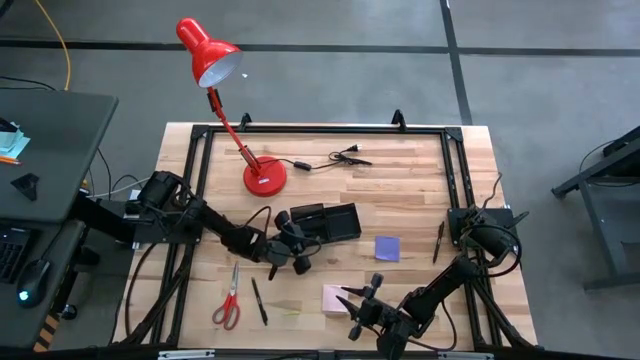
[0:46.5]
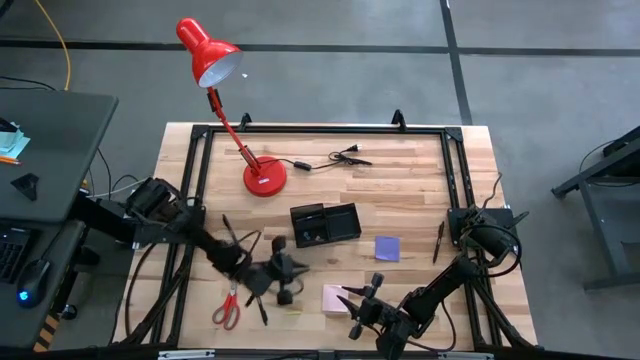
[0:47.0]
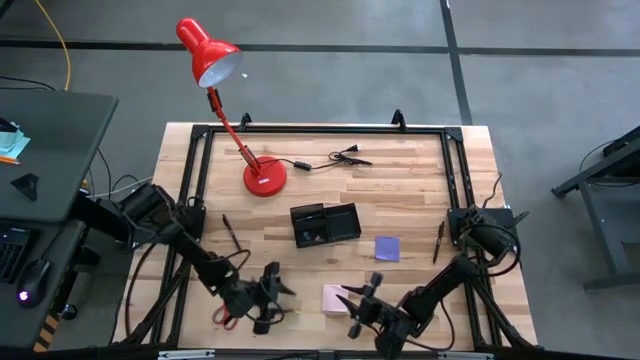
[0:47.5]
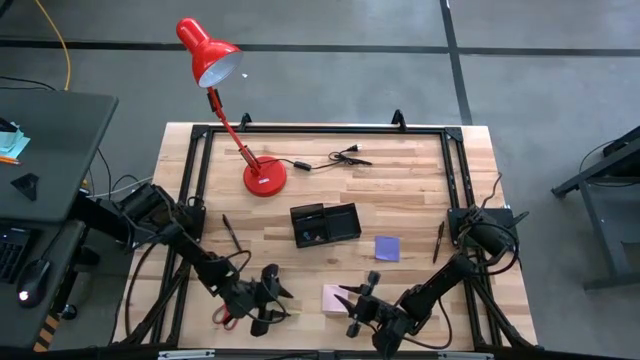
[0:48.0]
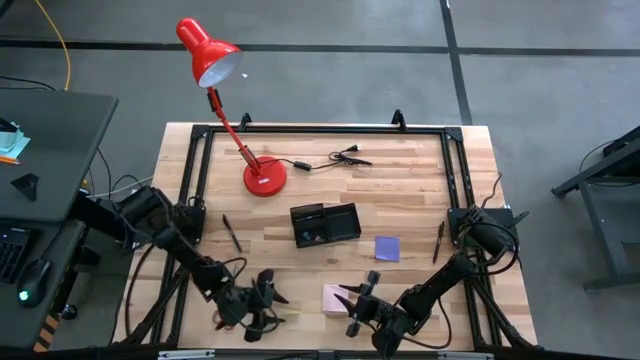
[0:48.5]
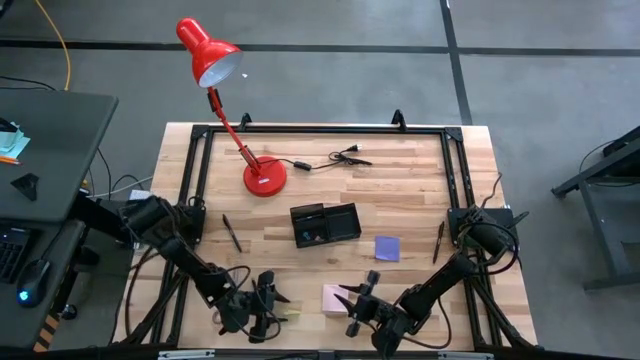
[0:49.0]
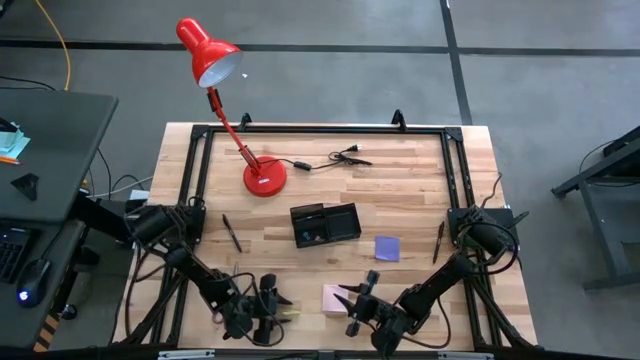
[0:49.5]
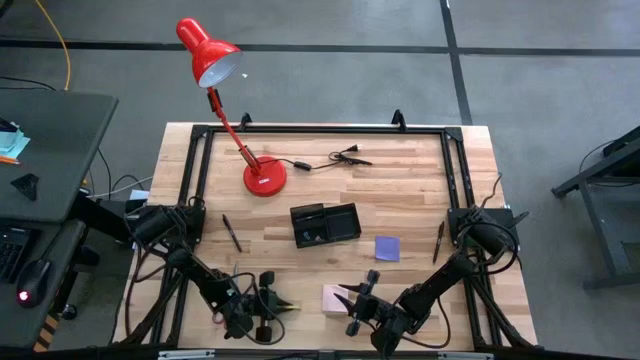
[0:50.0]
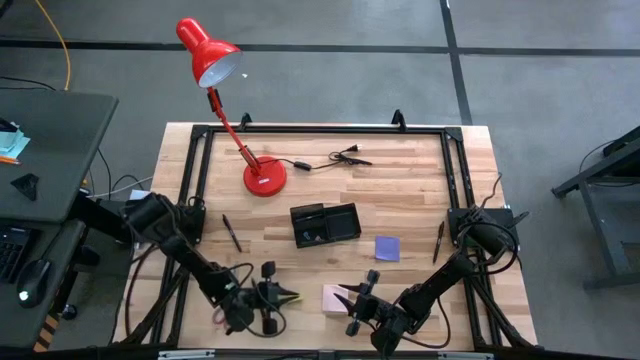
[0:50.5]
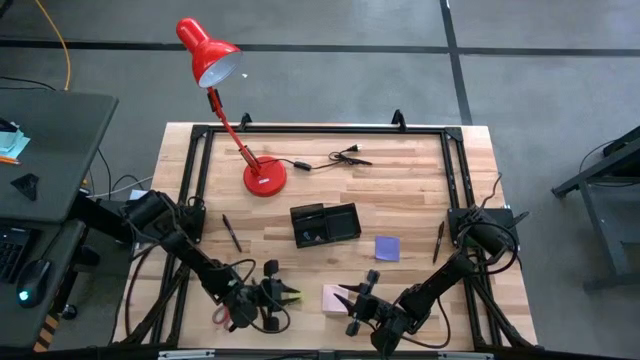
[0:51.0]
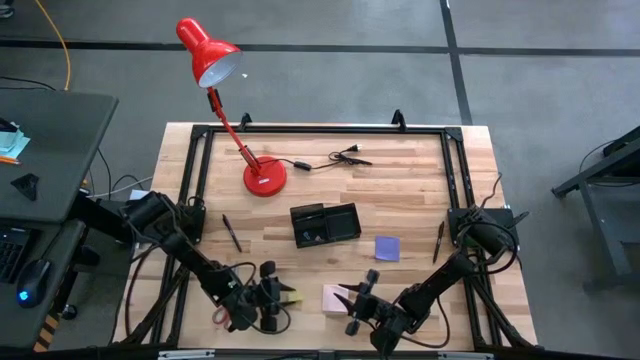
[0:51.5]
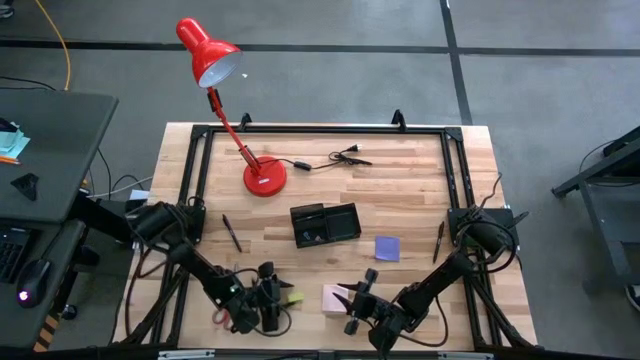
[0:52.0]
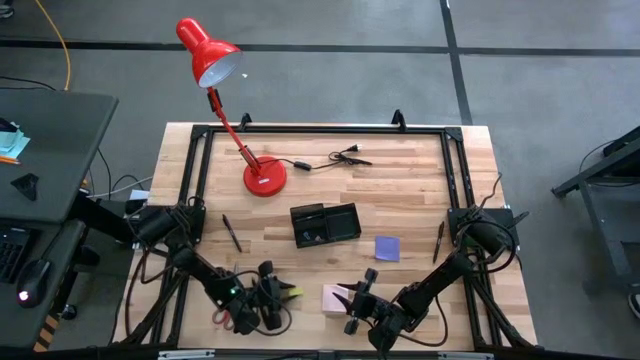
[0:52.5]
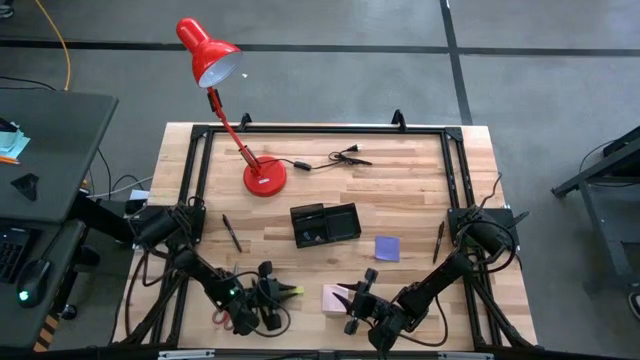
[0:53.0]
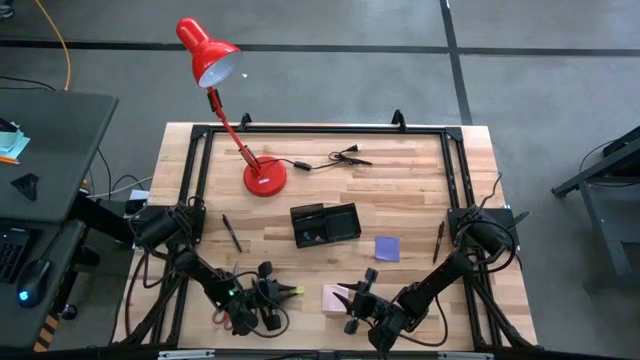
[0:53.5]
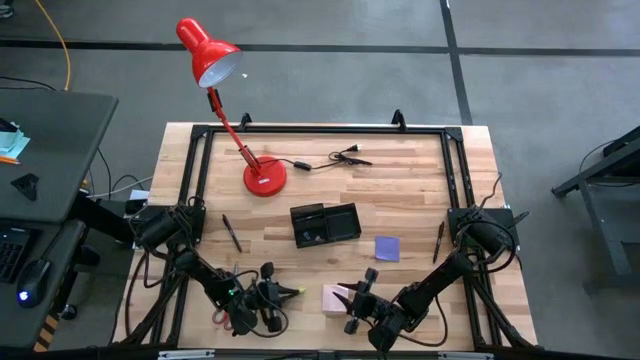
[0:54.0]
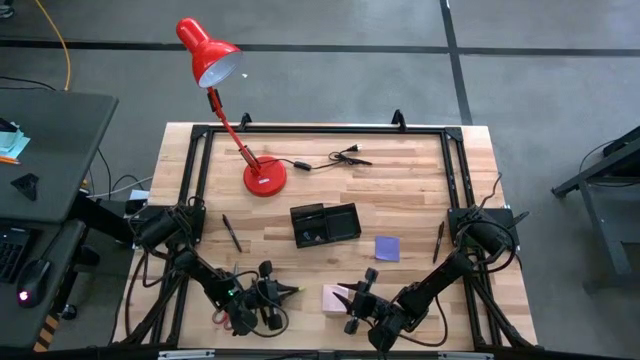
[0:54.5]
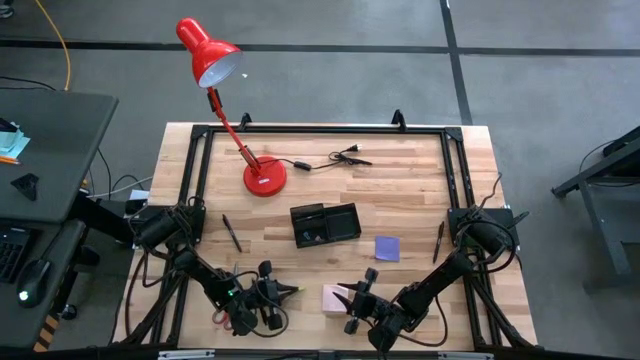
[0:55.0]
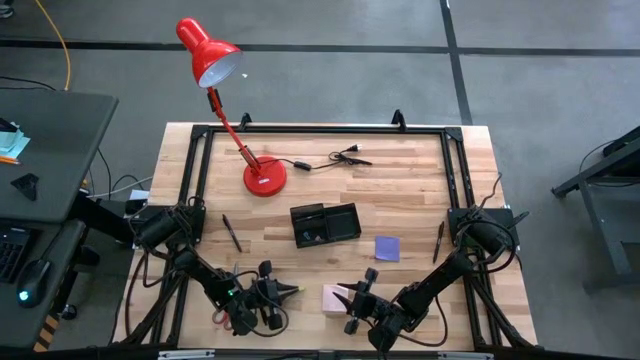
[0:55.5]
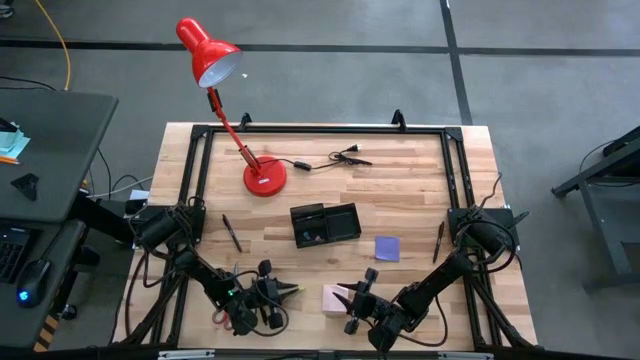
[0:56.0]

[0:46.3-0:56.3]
Task: Pick and place office supplies into organizer
Put the yellow eraser into the black desk organizer

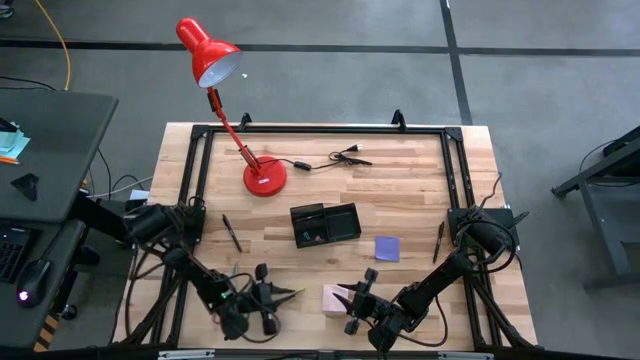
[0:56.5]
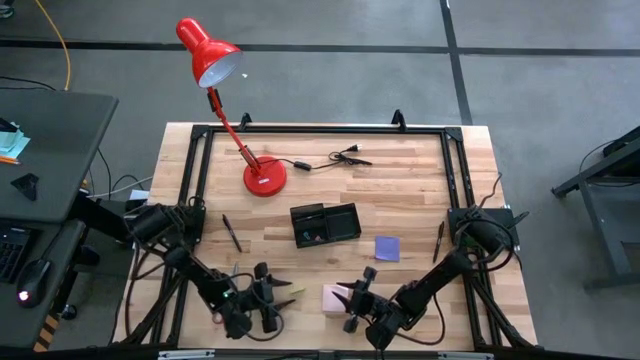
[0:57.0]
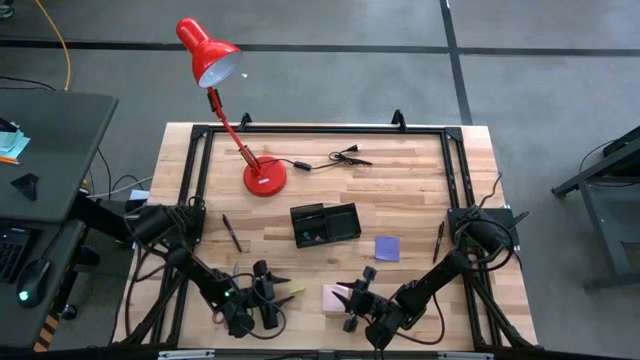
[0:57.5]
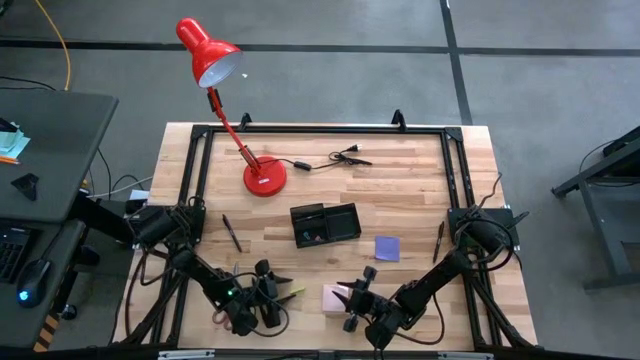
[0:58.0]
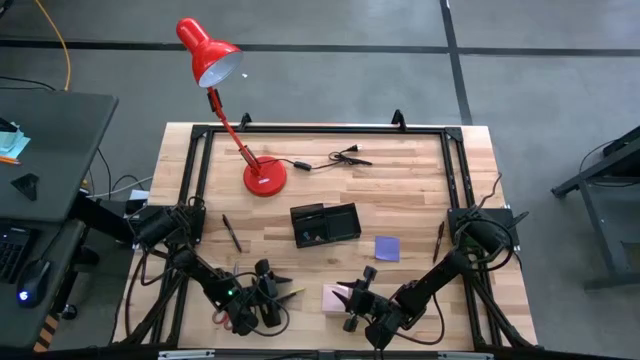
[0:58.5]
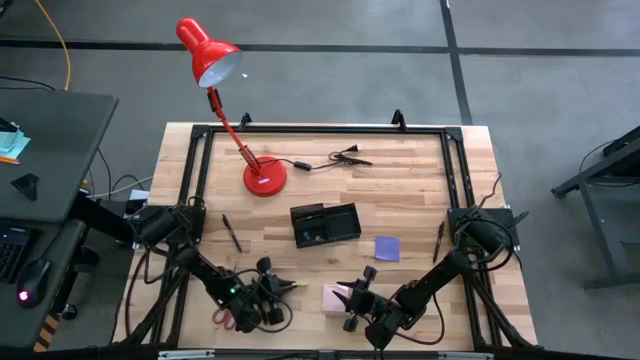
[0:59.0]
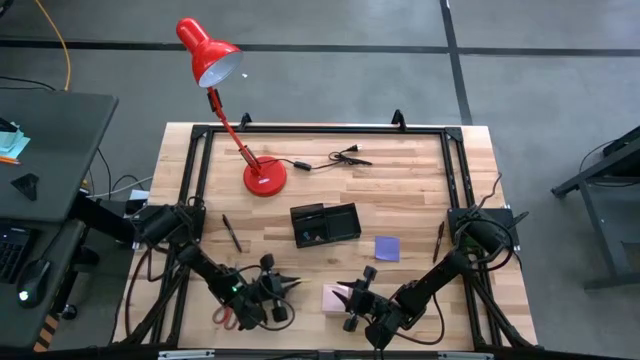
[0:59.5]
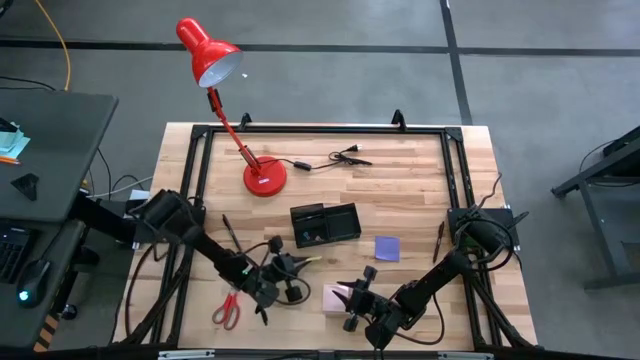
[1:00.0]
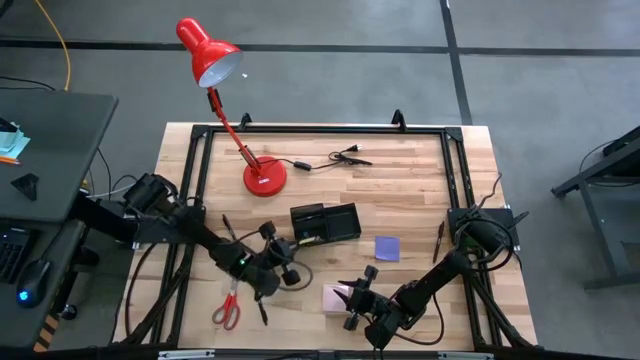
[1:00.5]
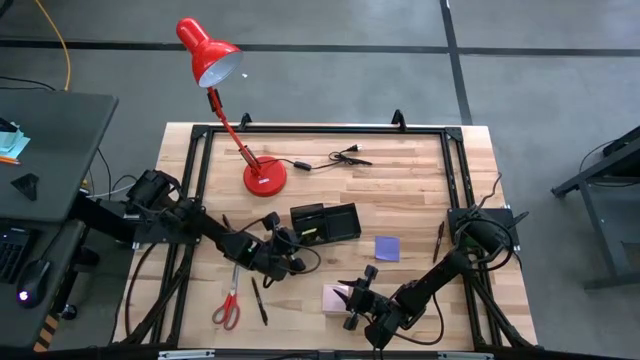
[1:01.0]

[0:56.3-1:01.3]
Put the yellow eraser into the black desk organizer

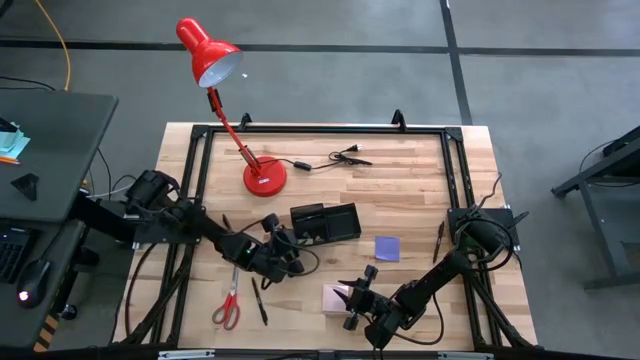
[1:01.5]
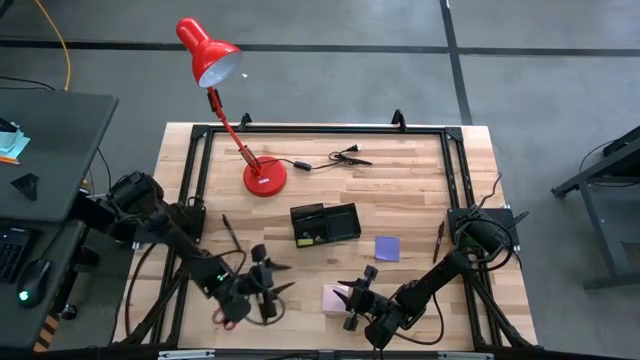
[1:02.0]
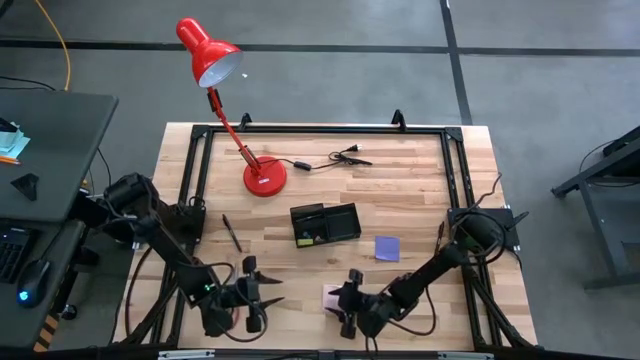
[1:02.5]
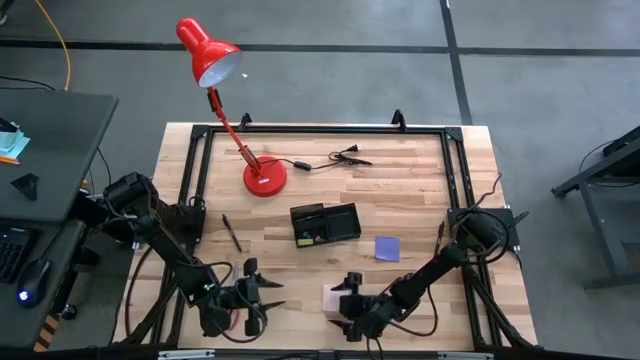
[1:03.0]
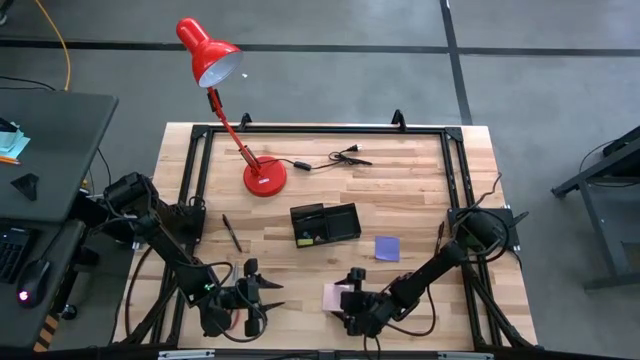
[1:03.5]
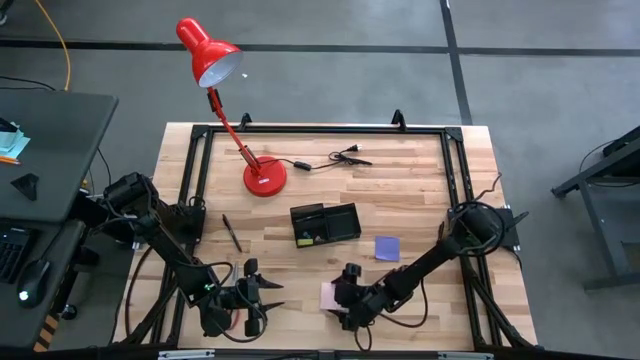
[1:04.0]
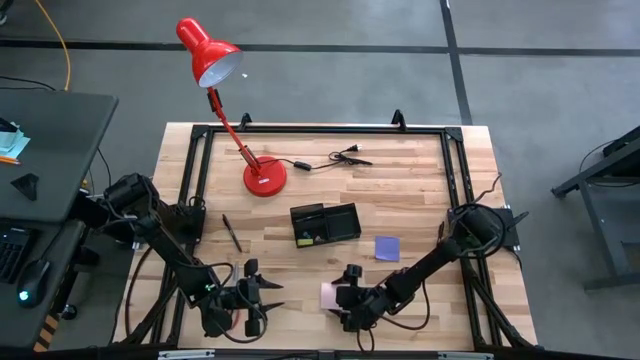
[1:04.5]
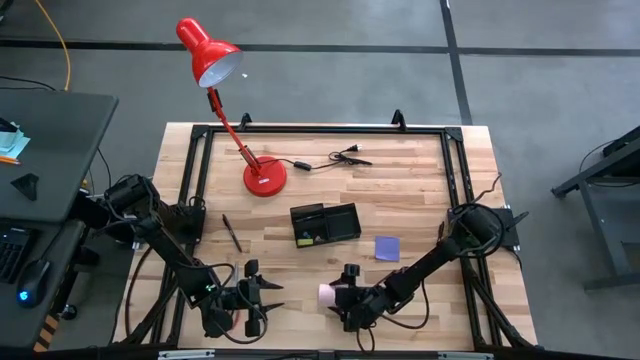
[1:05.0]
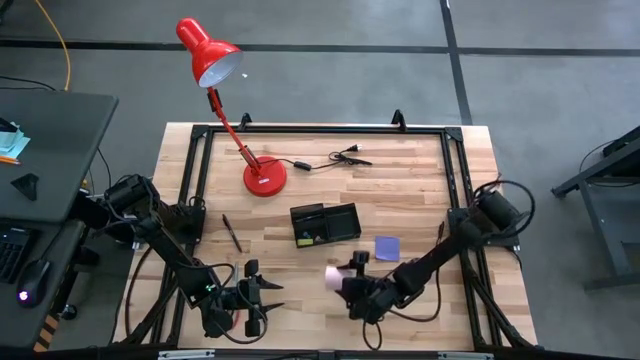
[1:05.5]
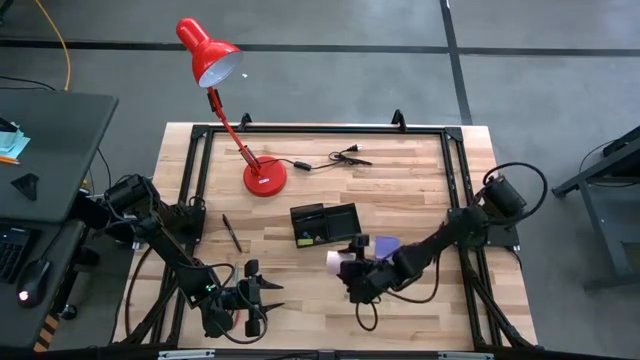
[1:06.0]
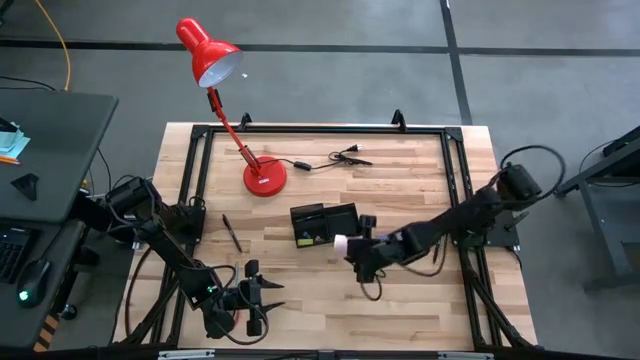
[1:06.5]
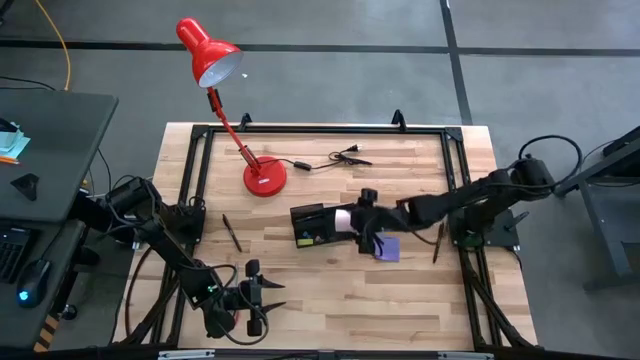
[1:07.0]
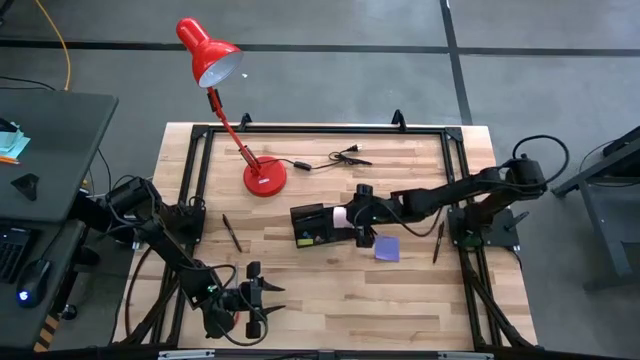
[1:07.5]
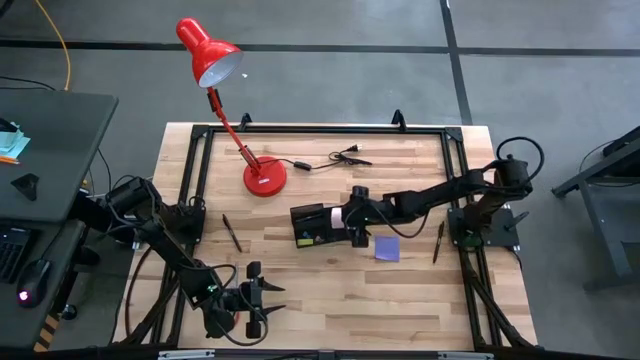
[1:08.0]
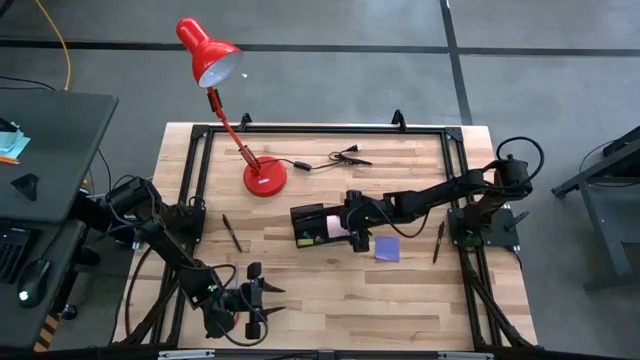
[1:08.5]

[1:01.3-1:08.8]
Put the pink sticky notes into the black desk organizer
